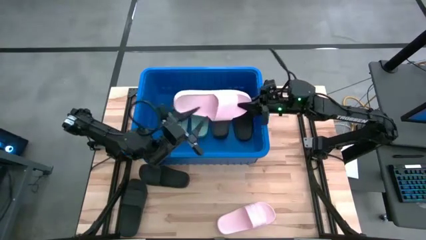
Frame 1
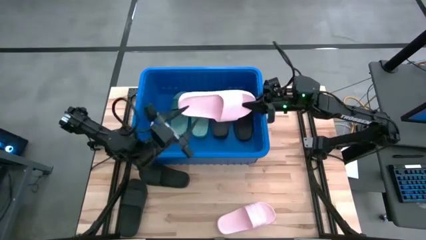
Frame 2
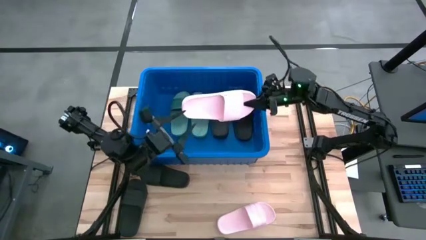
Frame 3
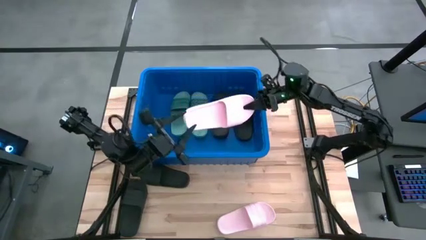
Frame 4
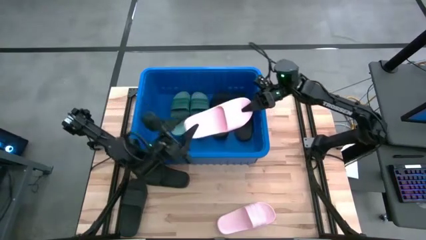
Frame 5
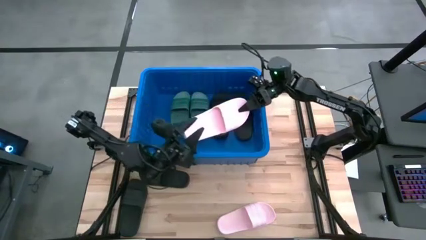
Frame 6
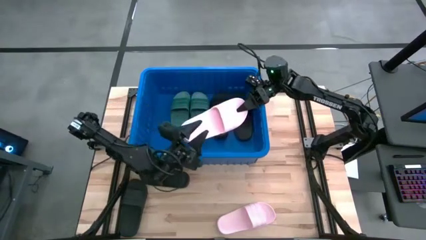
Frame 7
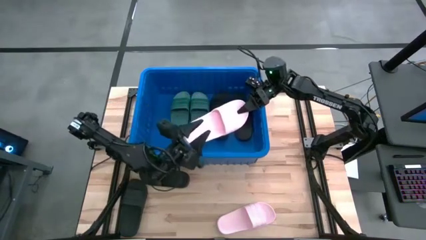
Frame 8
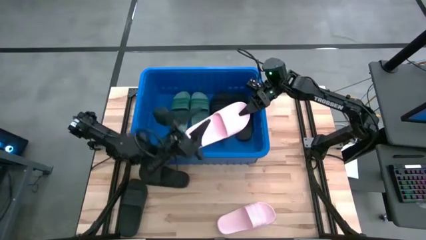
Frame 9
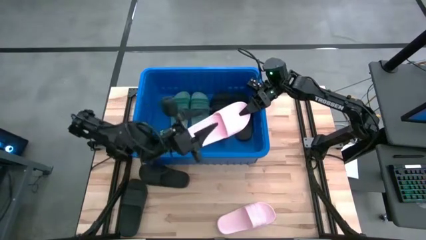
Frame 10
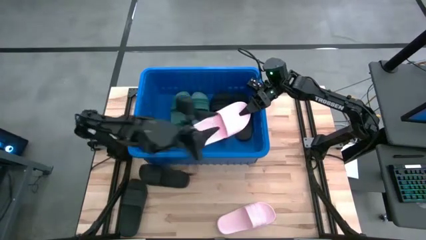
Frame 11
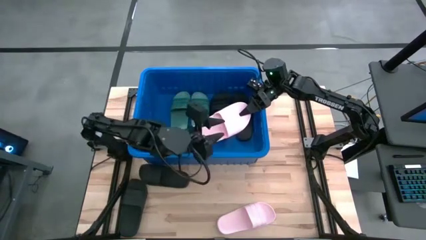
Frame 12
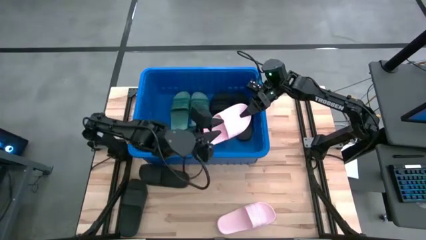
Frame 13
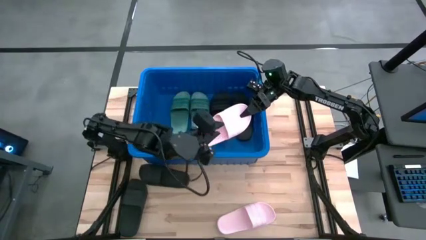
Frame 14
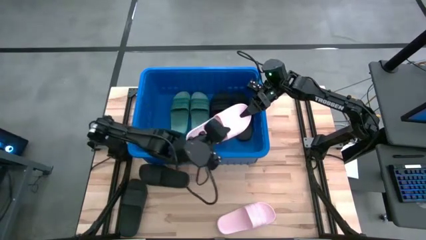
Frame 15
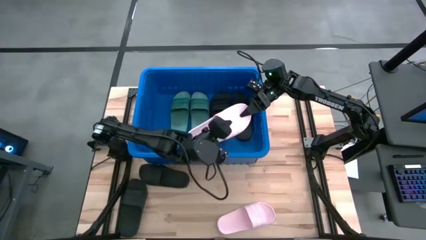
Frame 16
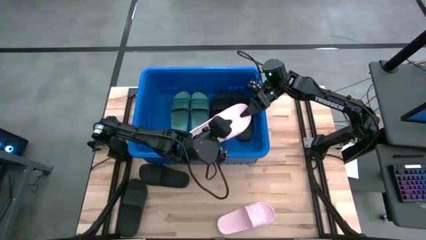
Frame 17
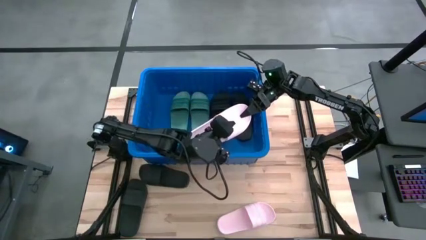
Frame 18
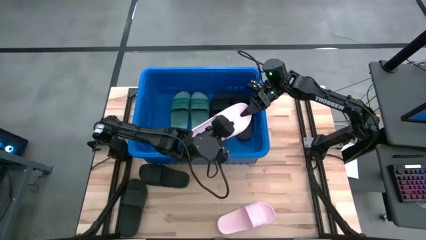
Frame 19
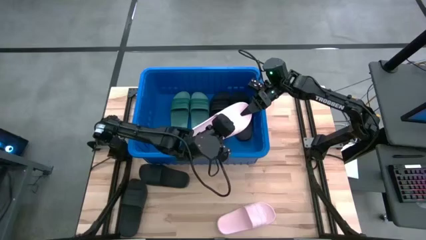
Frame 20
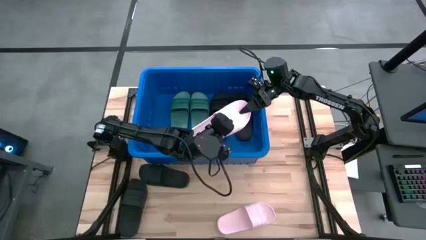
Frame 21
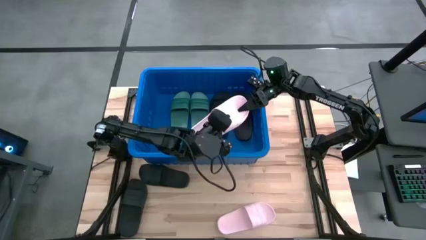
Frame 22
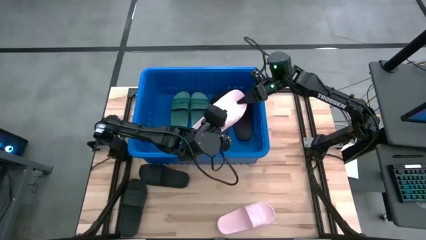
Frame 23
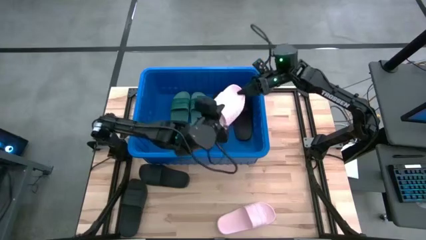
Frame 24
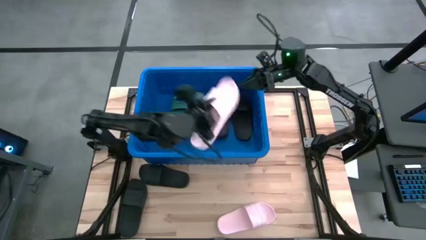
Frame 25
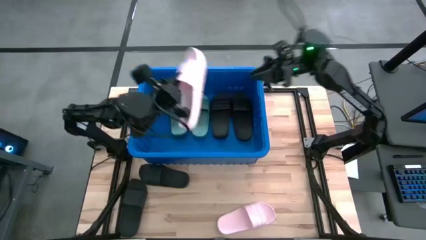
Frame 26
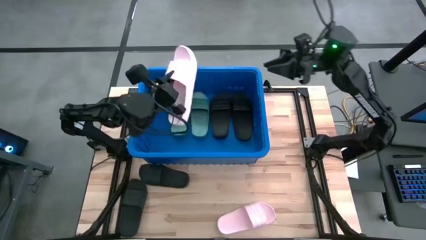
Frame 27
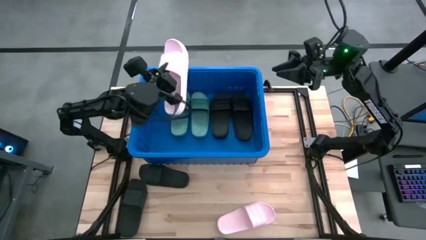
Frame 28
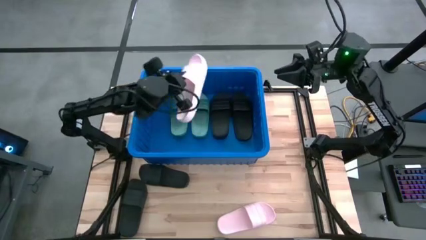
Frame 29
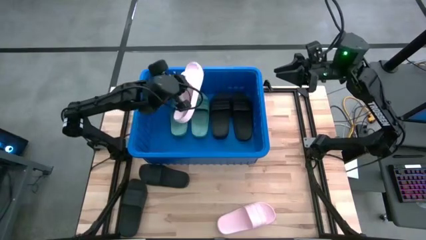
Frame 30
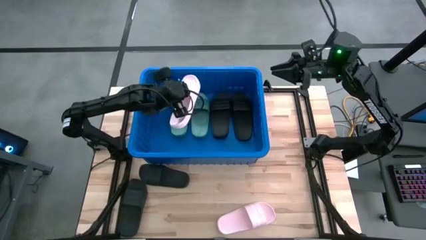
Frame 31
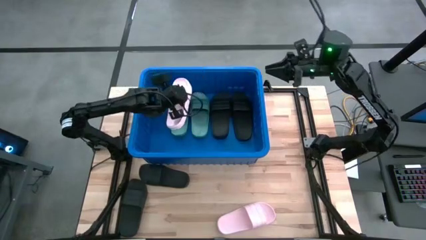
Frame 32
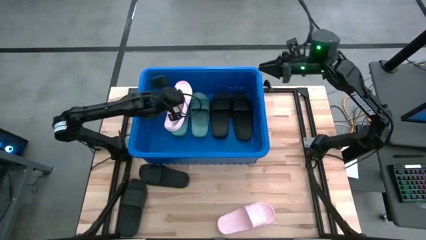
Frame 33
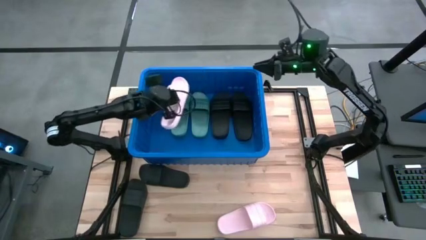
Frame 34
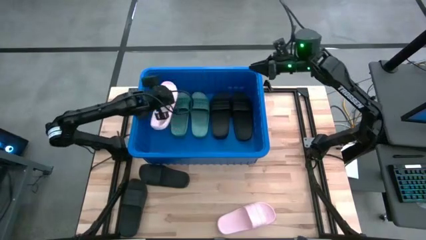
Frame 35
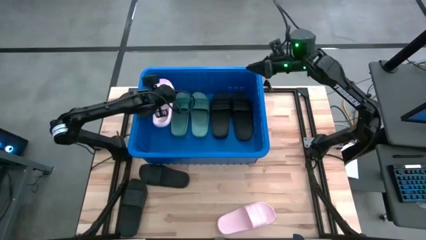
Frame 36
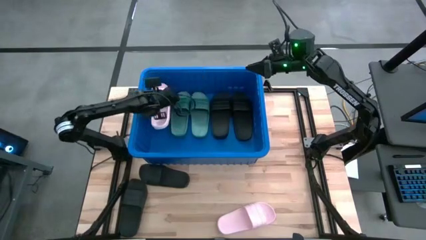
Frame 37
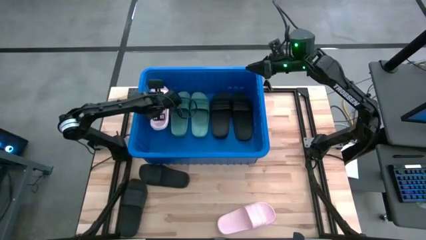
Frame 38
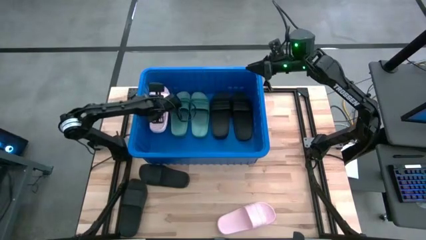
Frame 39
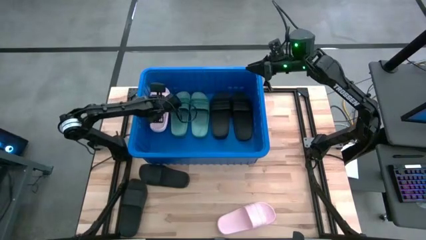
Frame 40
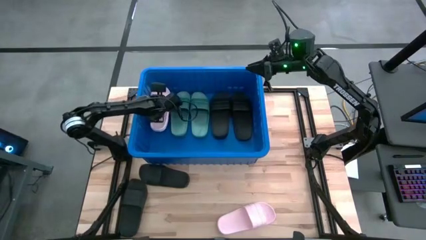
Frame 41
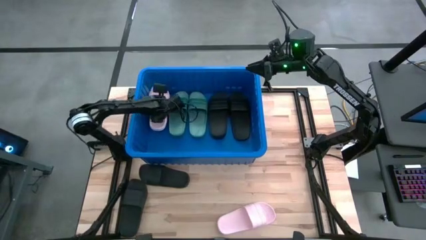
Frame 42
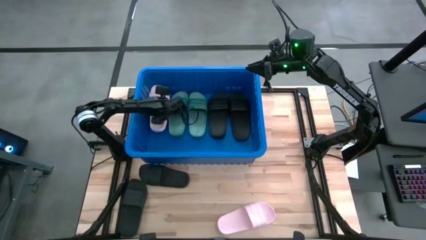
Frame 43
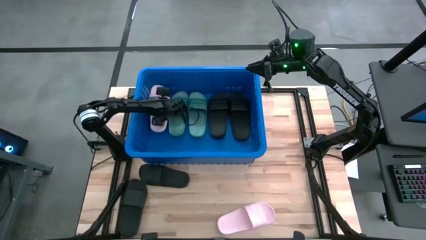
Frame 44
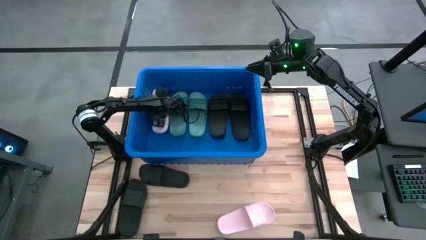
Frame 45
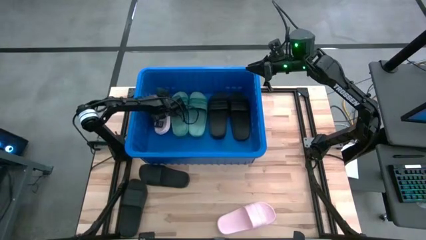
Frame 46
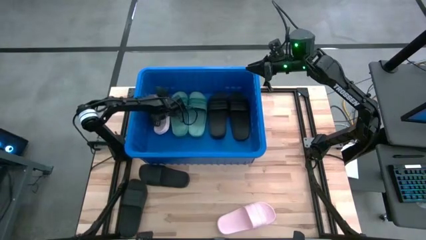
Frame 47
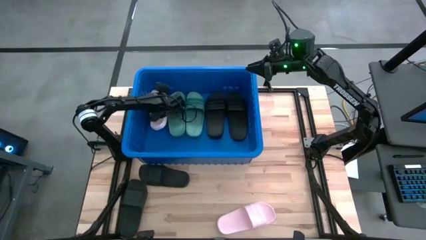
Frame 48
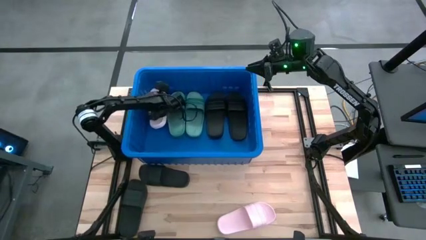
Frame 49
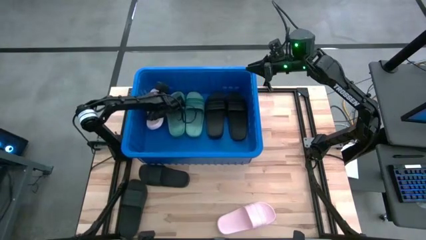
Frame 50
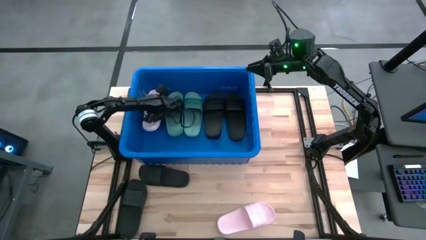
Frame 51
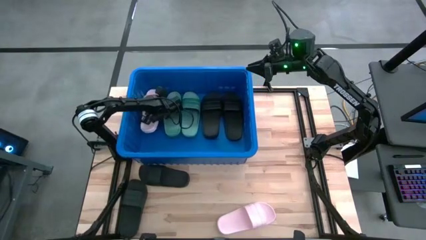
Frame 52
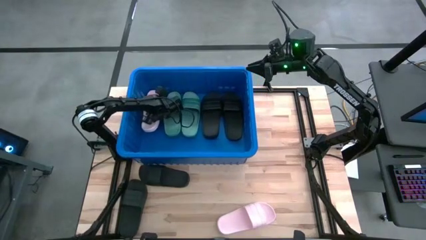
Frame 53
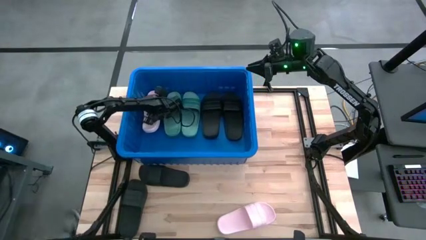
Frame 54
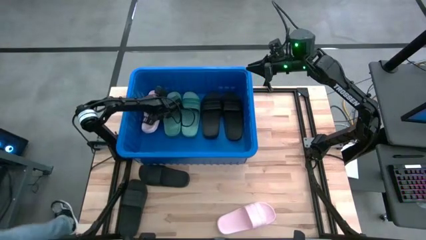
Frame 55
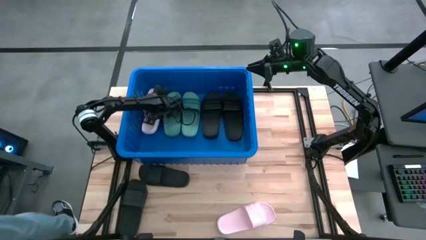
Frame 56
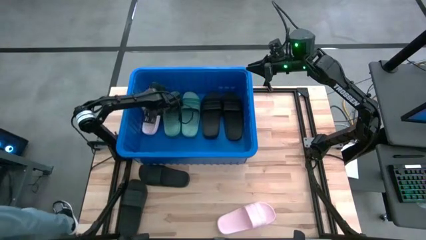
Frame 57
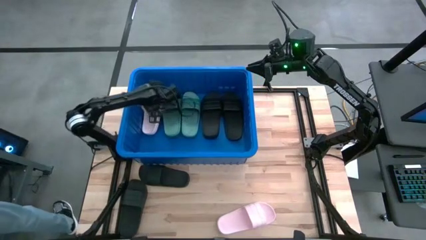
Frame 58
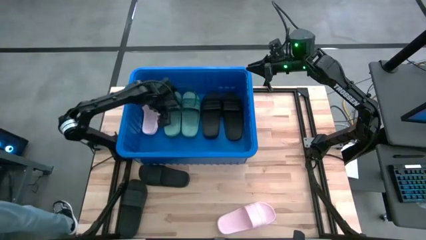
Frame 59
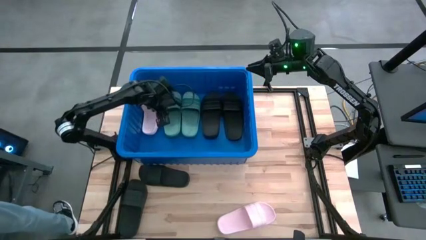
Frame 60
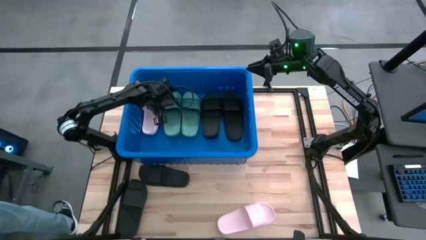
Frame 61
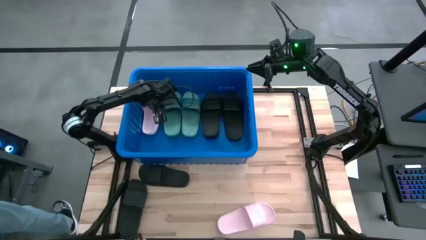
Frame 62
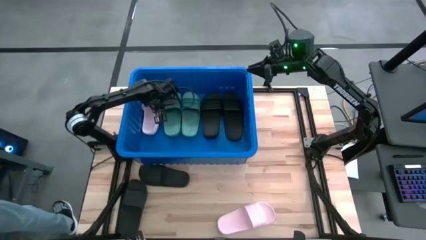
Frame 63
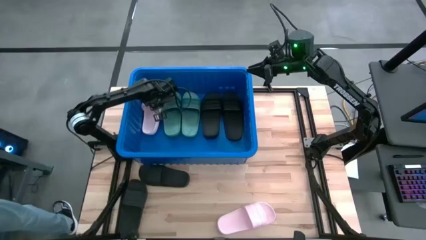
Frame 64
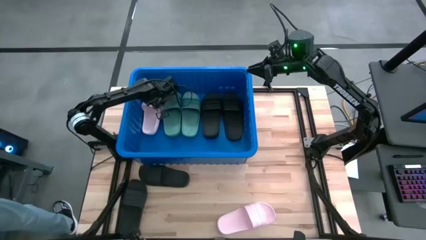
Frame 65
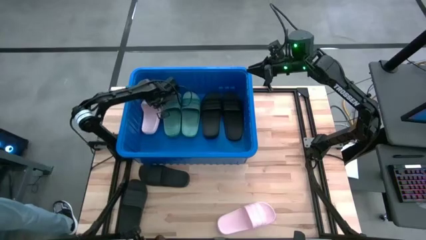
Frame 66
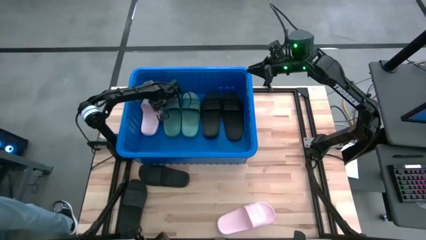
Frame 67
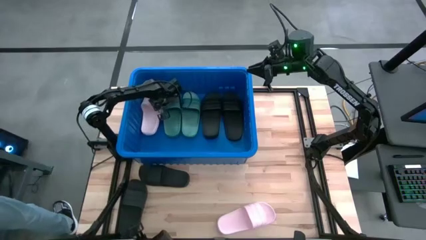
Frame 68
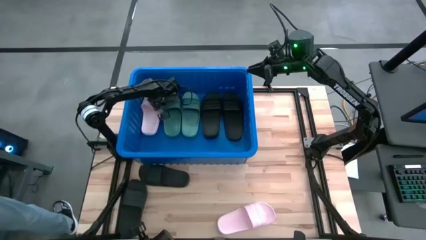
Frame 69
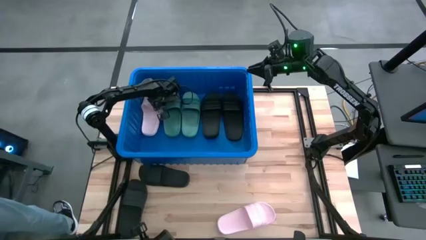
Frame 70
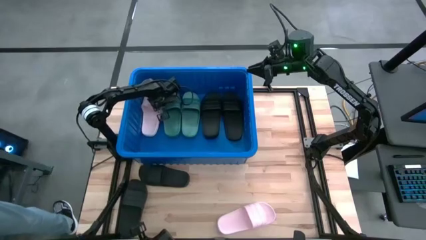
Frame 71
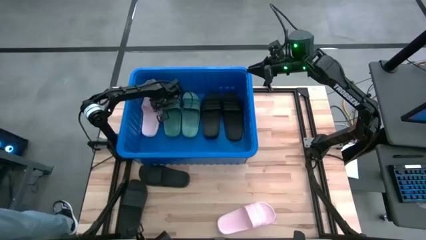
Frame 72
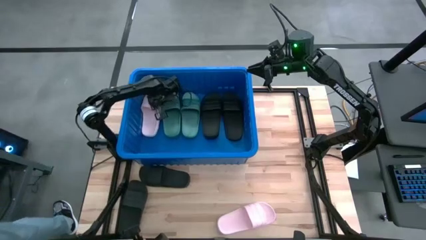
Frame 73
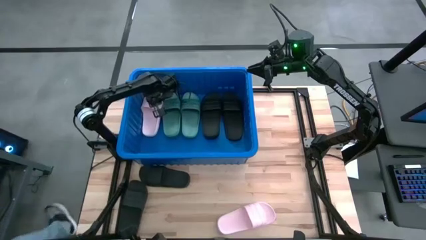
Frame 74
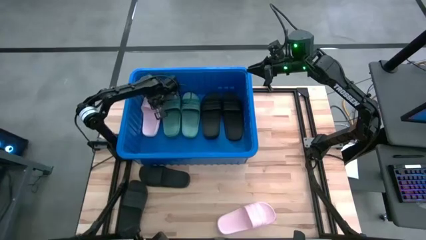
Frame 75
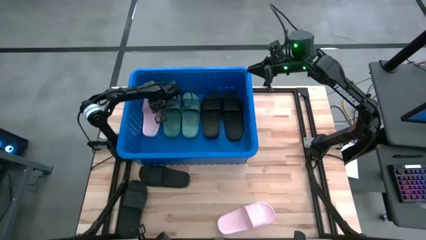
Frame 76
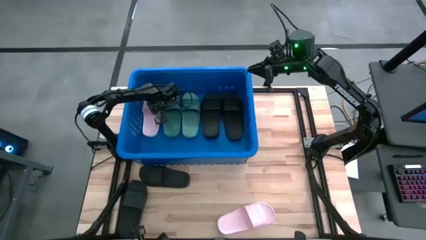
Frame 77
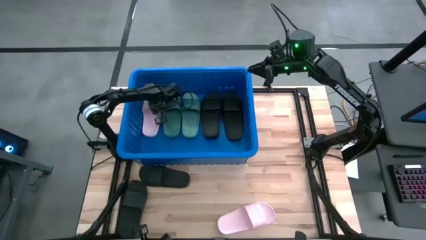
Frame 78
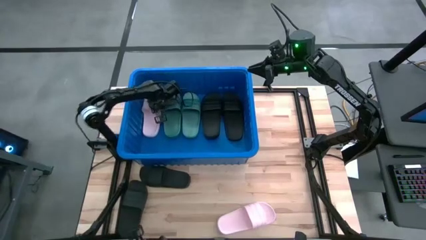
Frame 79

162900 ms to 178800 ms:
Task: Pick and place slides into bin
Put the left pink slide into the blue bin
